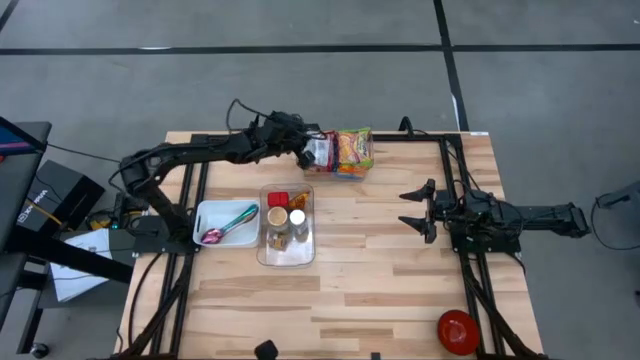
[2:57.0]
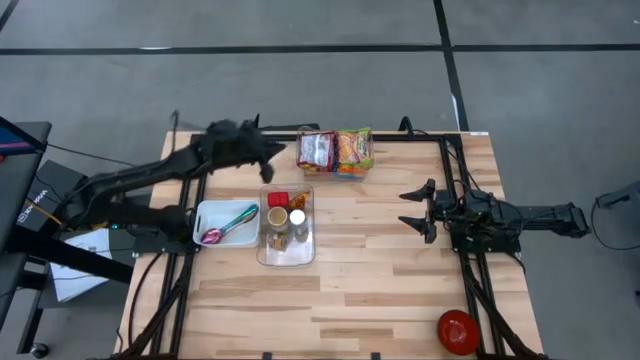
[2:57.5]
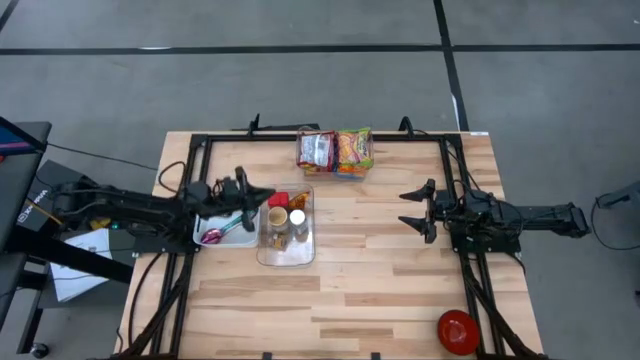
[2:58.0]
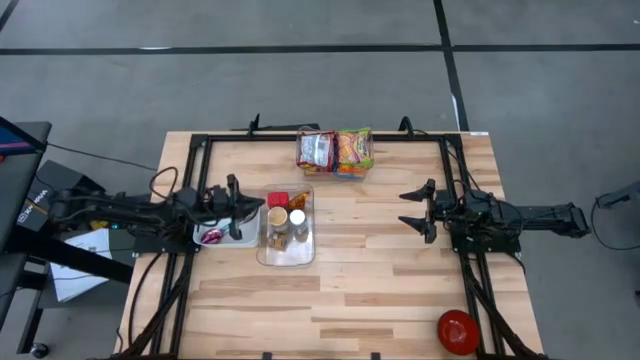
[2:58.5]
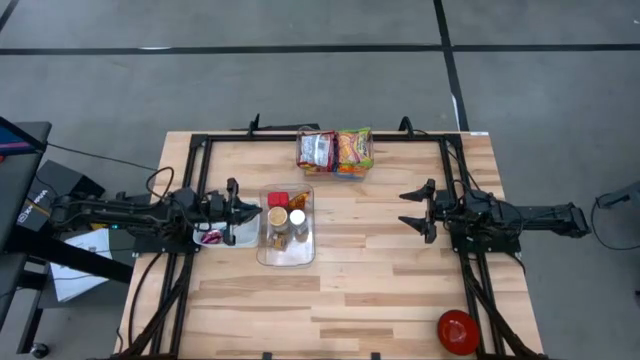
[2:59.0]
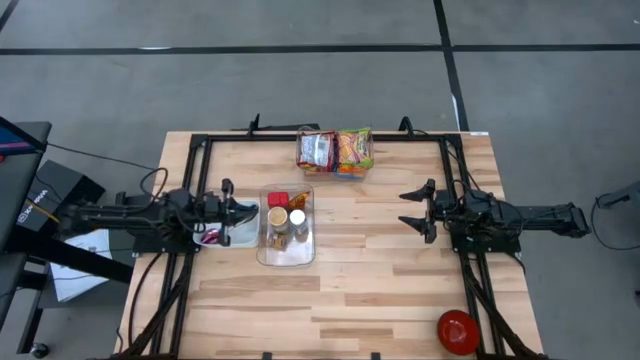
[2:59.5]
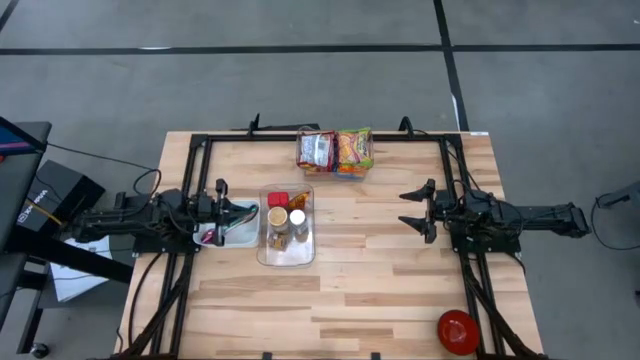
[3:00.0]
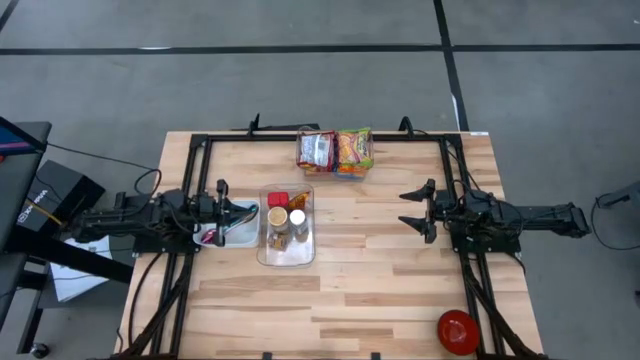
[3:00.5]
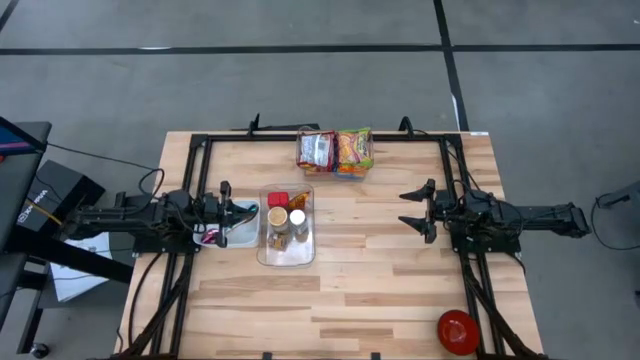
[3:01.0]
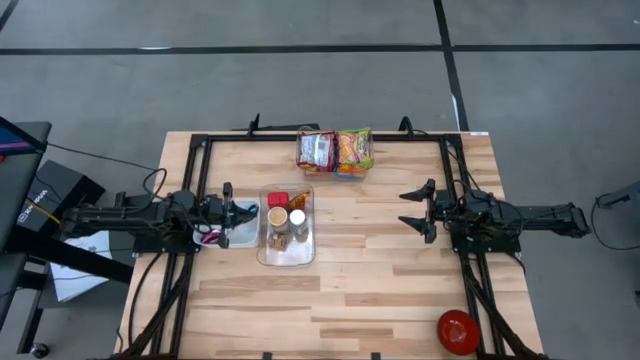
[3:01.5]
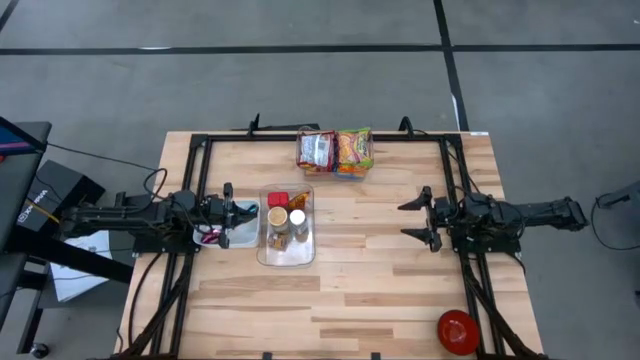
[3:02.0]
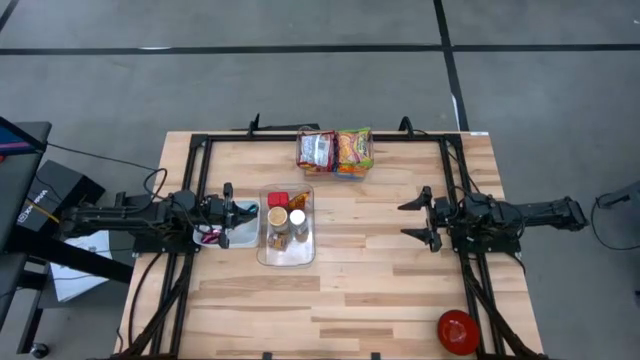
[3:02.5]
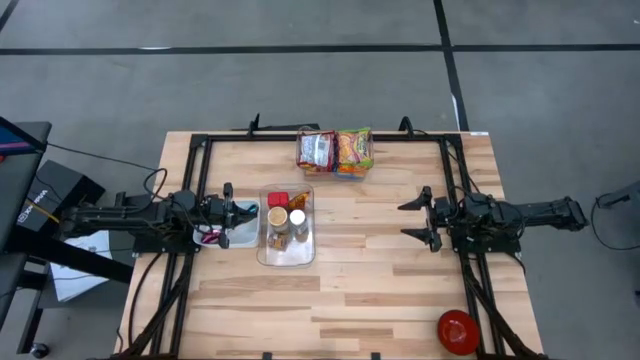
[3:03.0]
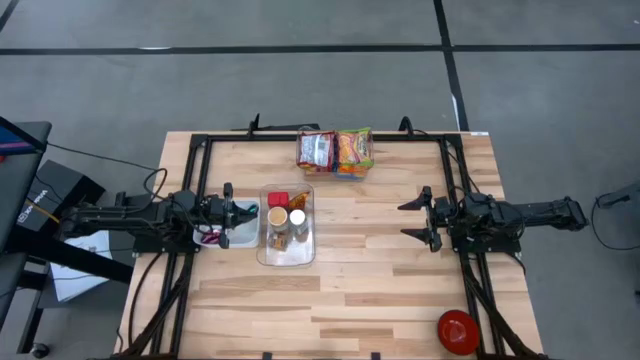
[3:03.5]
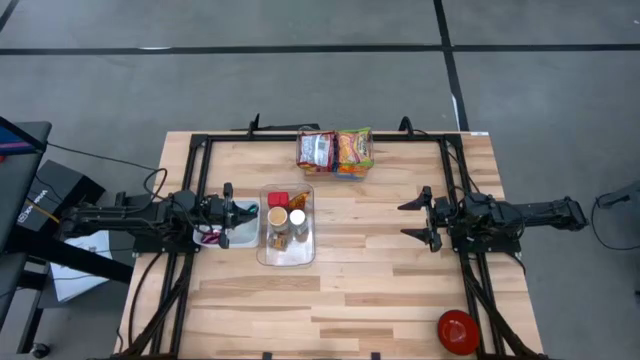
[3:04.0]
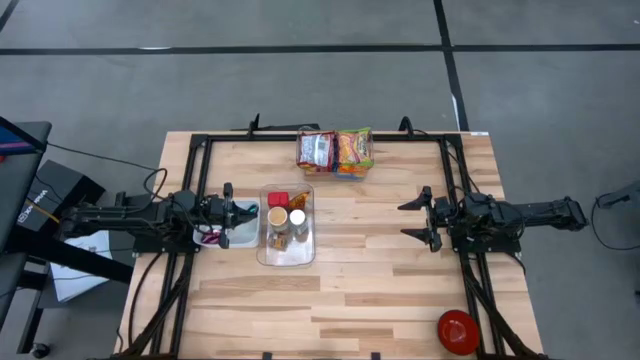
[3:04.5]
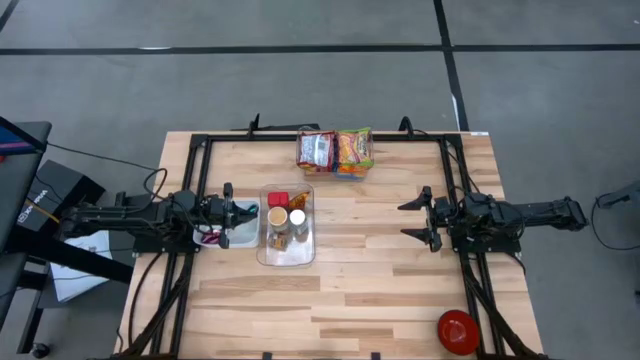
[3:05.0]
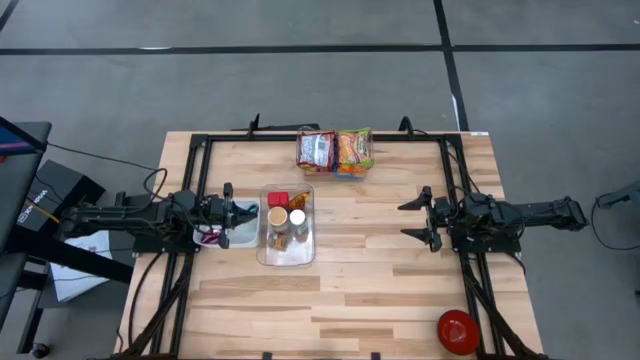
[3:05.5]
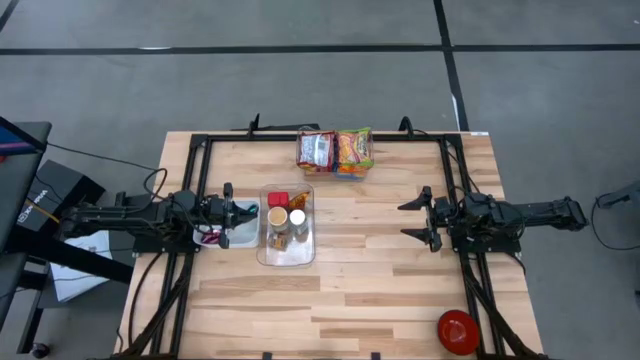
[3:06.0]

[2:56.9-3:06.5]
Task: Pick & Place Food Item
Return to Home Position

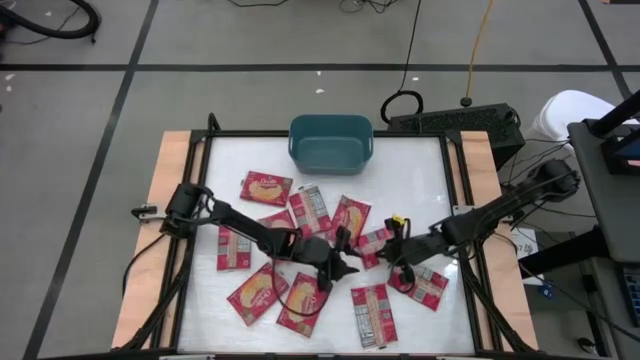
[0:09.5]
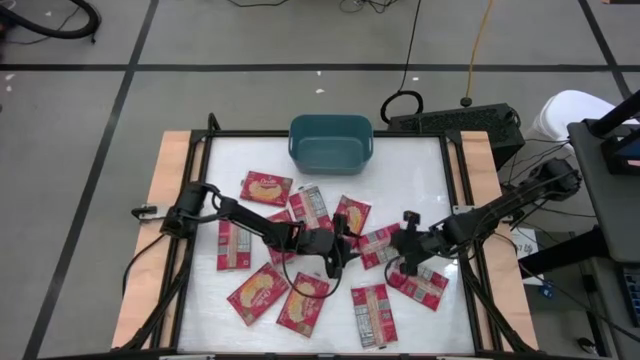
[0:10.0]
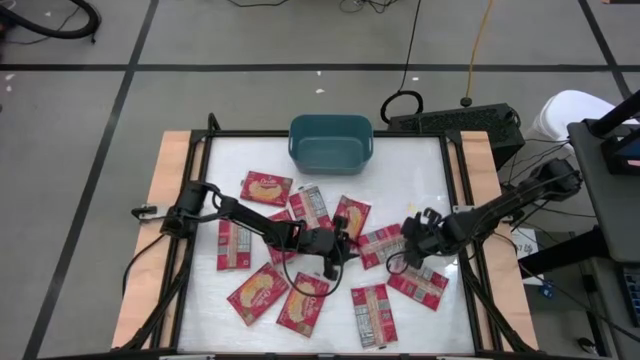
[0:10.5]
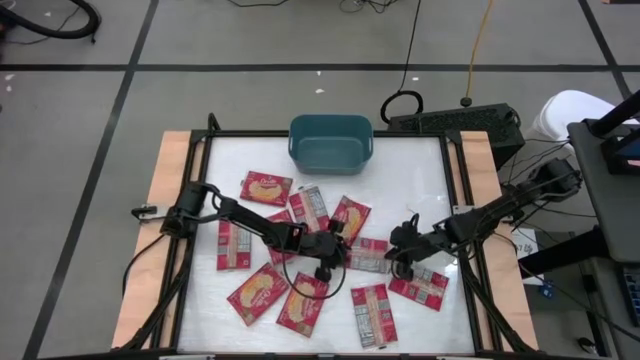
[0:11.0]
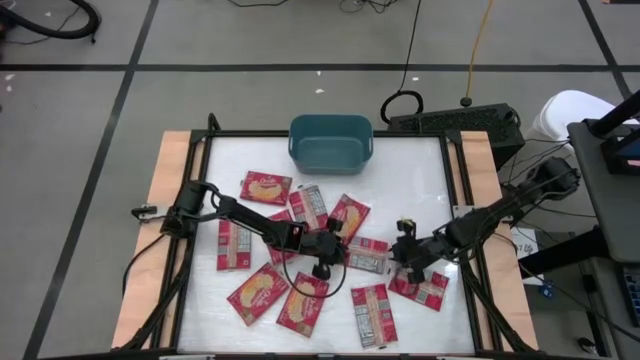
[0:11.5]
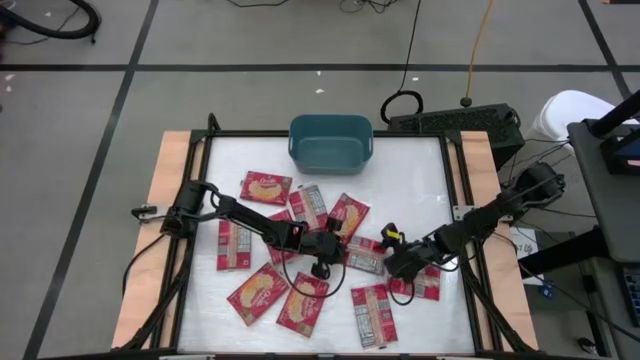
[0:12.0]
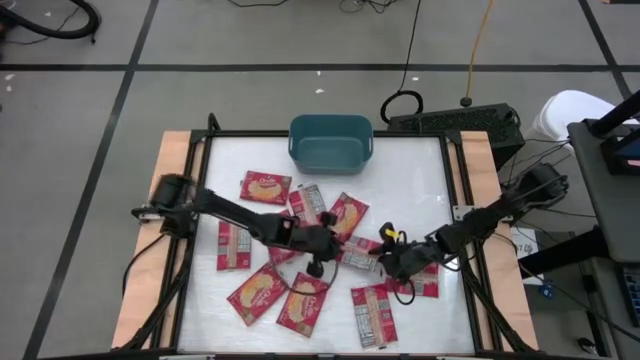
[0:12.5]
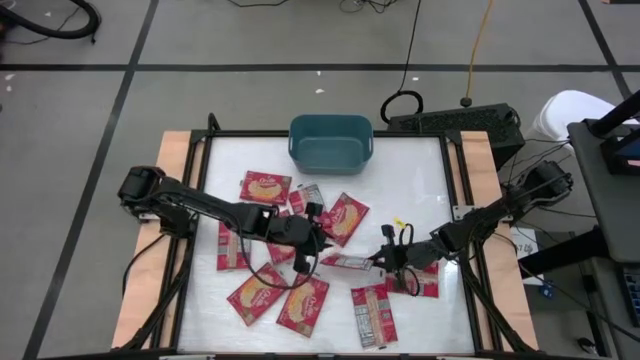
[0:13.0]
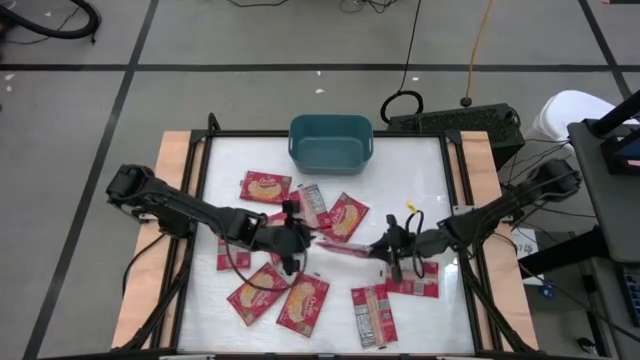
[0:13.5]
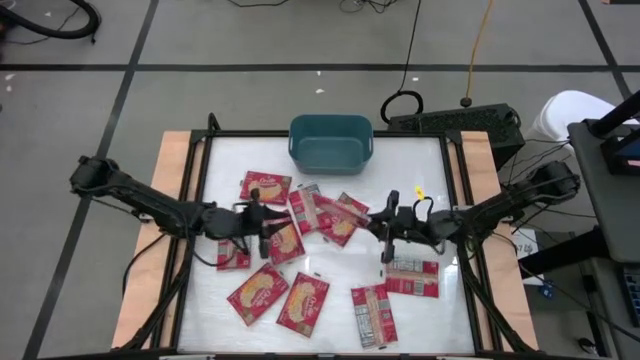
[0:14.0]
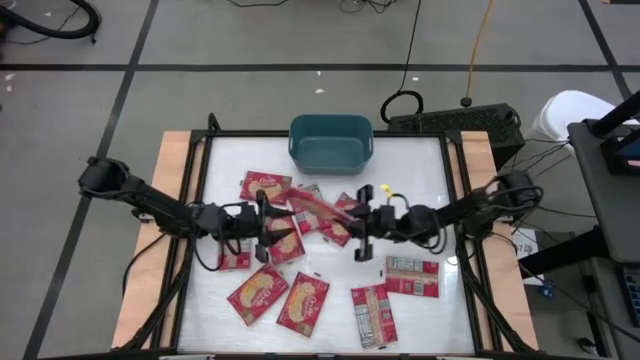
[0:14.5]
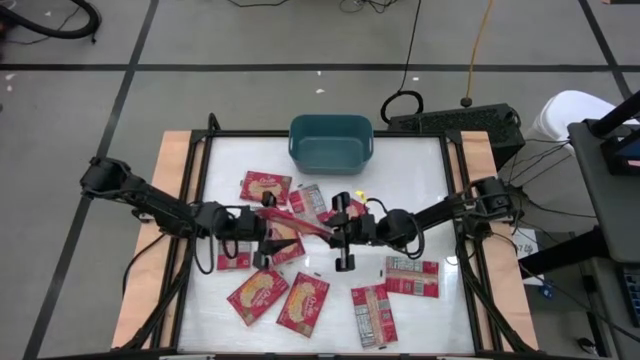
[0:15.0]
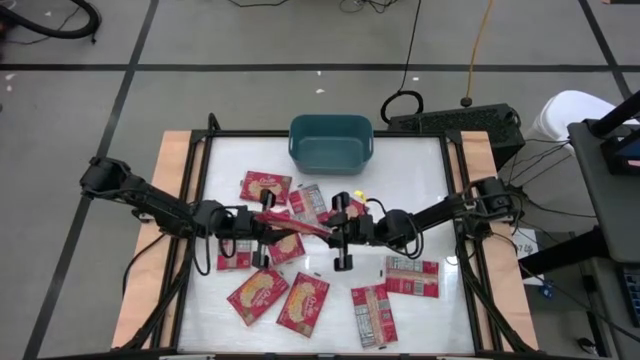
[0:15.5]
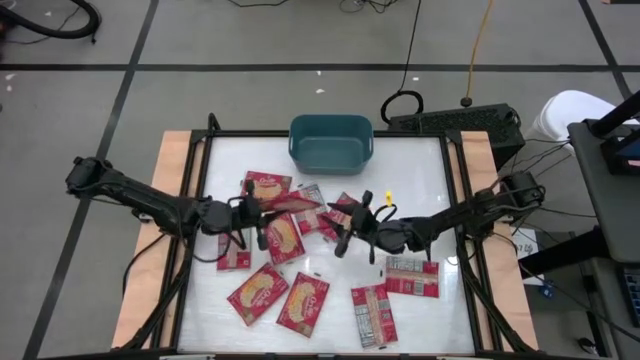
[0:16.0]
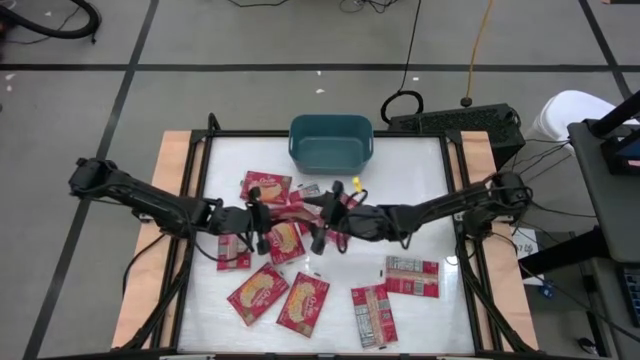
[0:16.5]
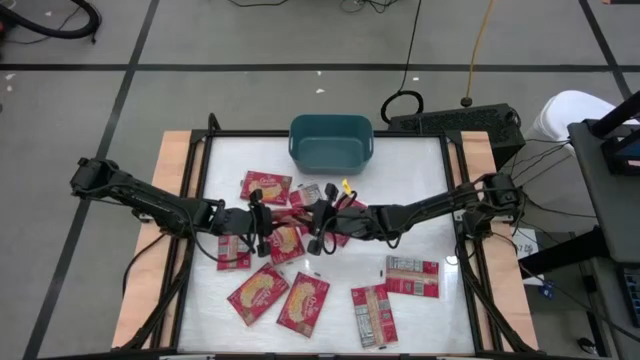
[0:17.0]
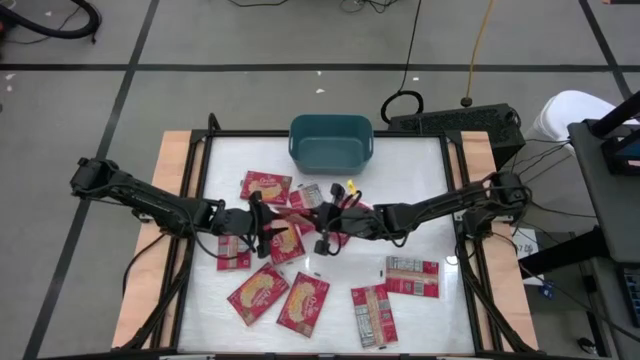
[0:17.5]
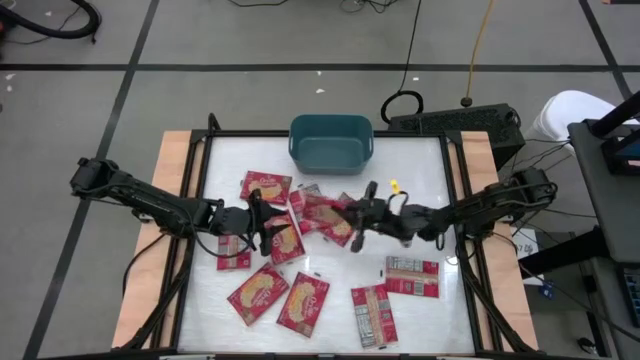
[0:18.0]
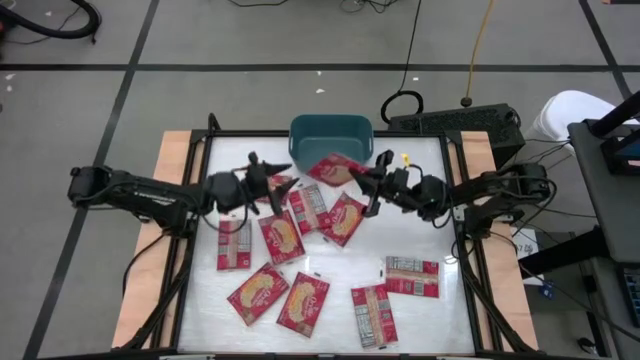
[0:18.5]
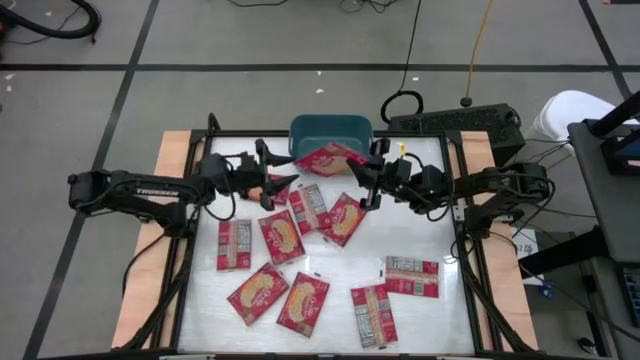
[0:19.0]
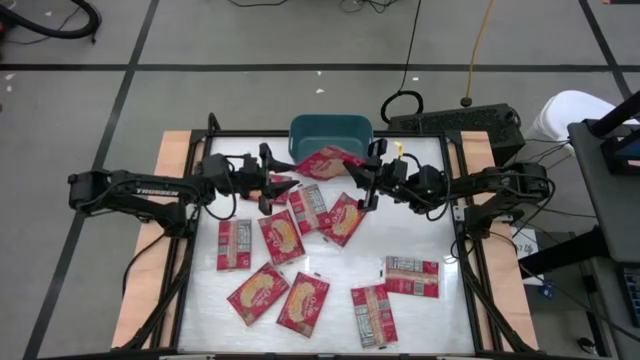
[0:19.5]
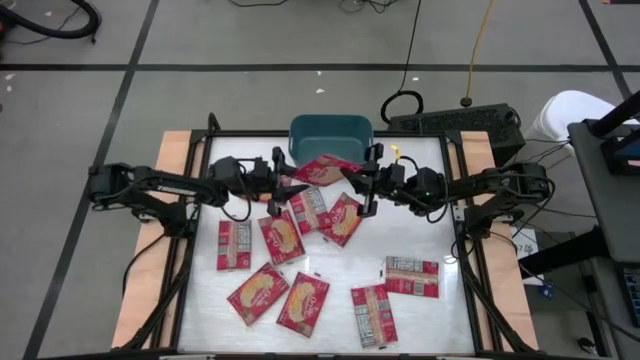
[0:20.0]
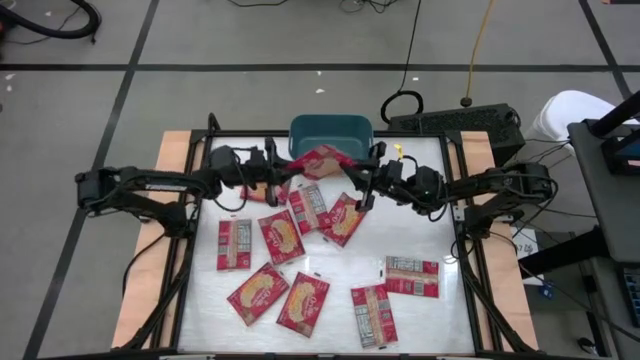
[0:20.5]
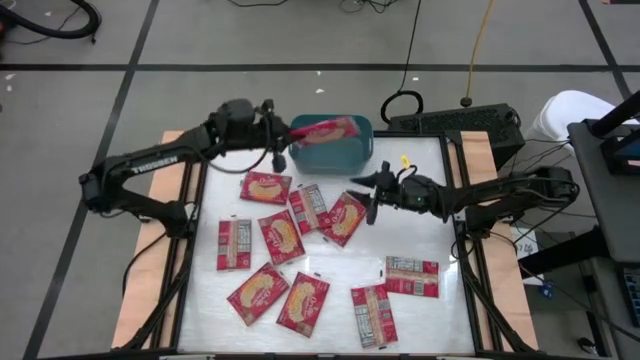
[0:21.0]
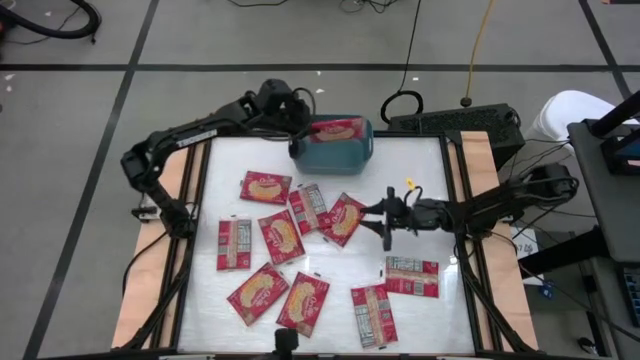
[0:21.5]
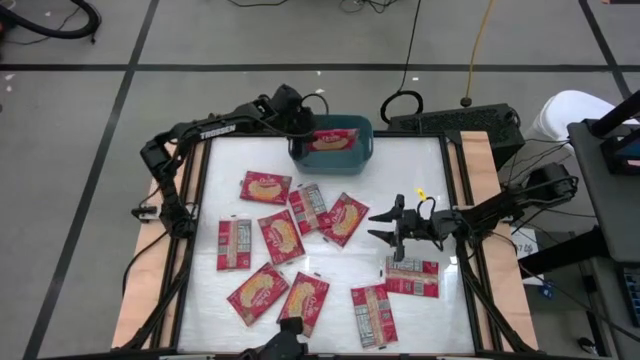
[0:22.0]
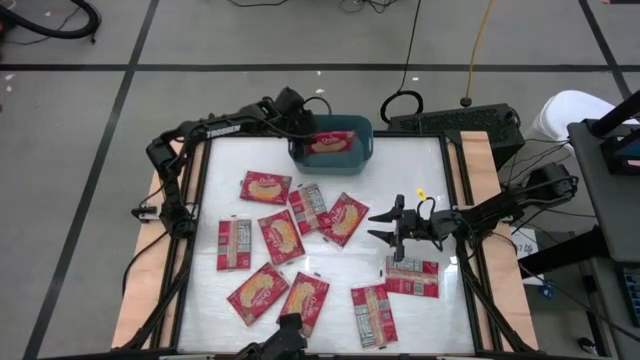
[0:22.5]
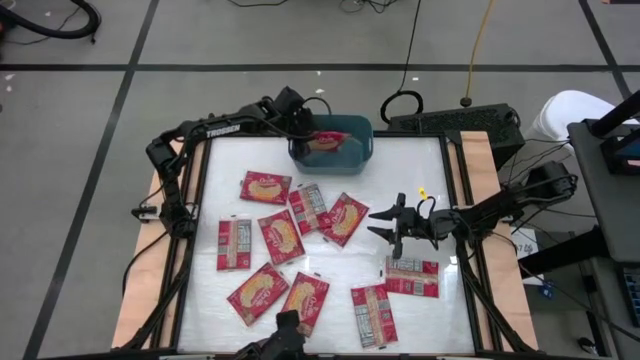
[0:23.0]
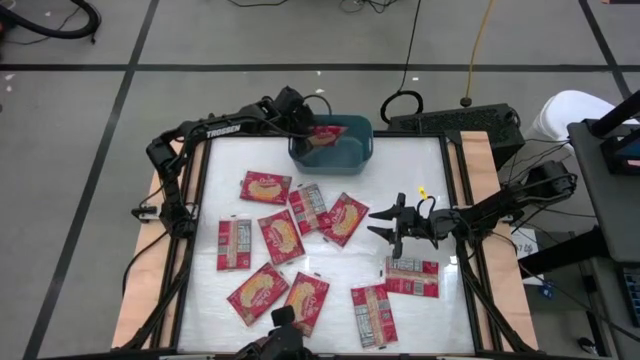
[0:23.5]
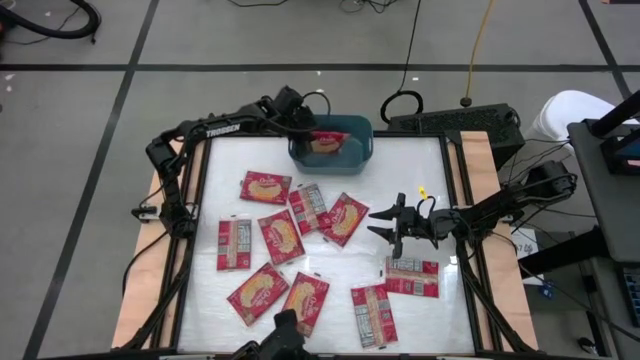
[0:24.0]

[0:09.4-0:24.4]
Task: Sort popcorn bags into baskets
Put the red popcorn bag into the green bin
